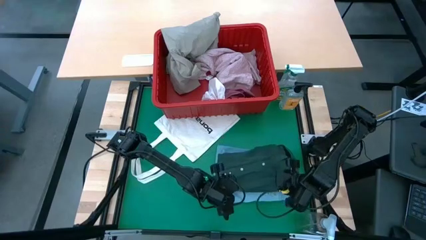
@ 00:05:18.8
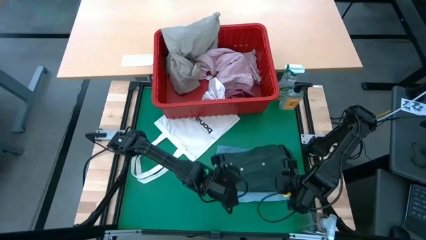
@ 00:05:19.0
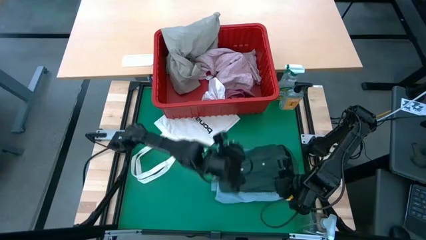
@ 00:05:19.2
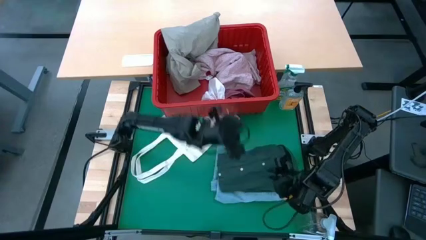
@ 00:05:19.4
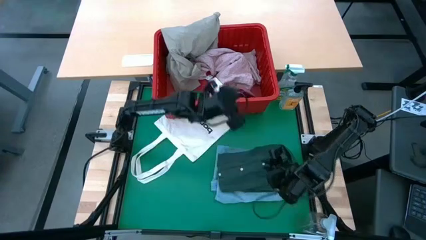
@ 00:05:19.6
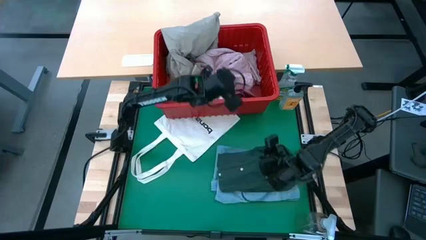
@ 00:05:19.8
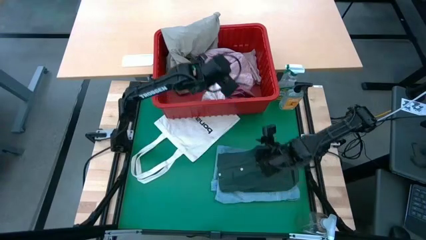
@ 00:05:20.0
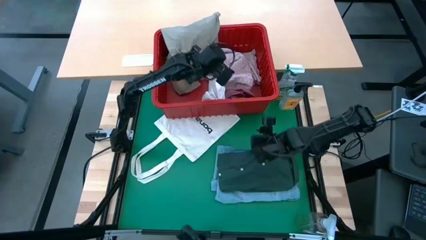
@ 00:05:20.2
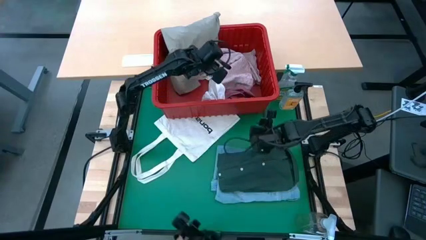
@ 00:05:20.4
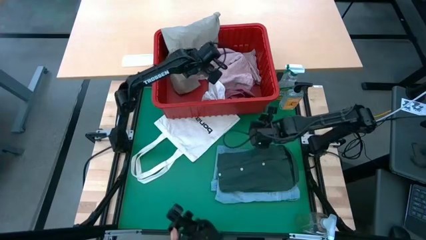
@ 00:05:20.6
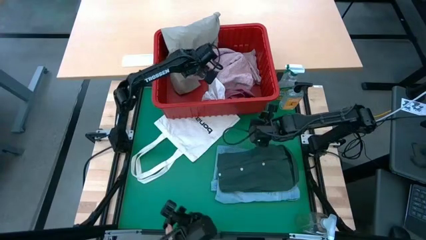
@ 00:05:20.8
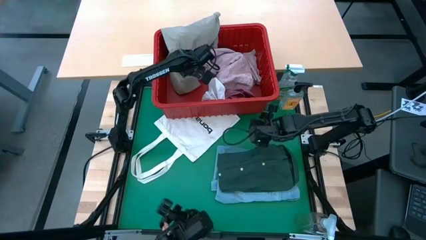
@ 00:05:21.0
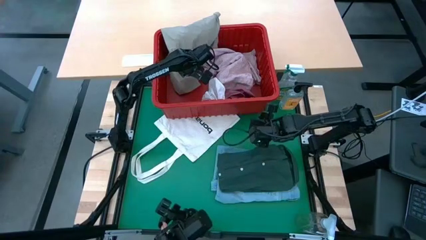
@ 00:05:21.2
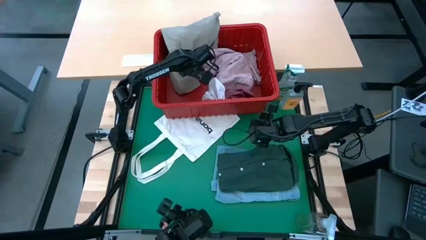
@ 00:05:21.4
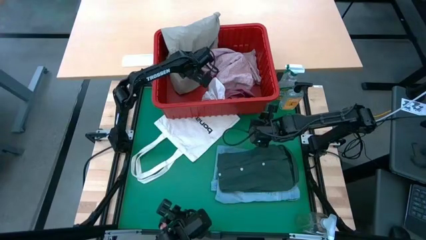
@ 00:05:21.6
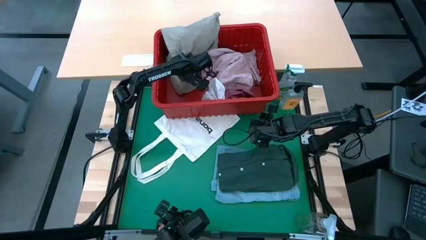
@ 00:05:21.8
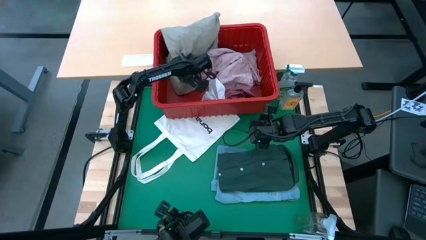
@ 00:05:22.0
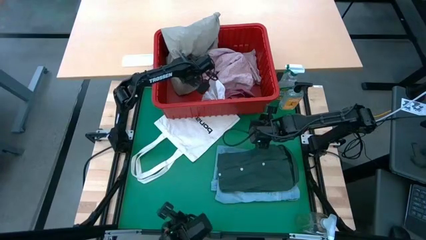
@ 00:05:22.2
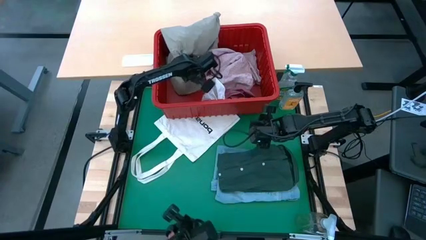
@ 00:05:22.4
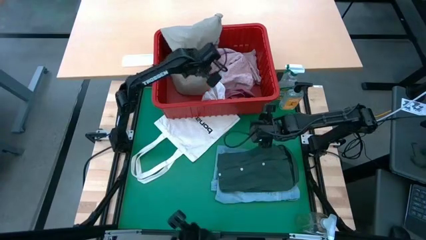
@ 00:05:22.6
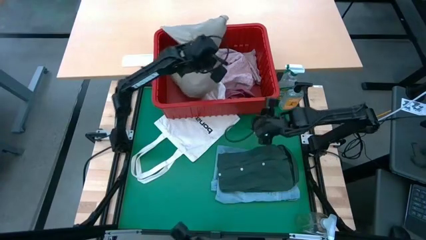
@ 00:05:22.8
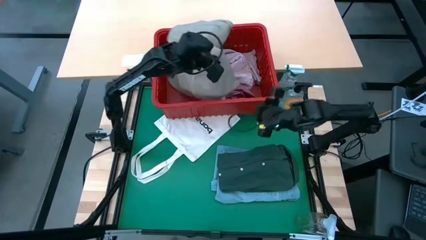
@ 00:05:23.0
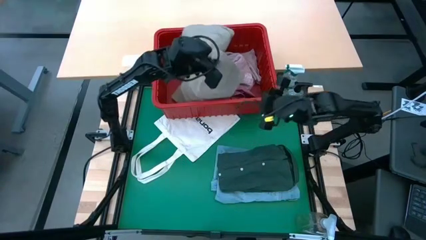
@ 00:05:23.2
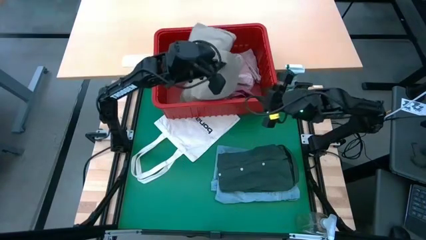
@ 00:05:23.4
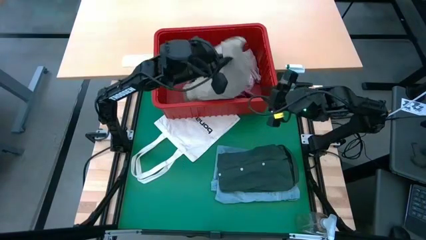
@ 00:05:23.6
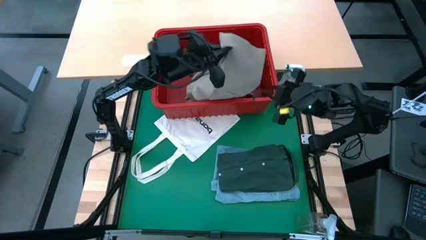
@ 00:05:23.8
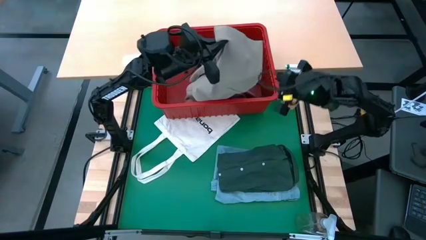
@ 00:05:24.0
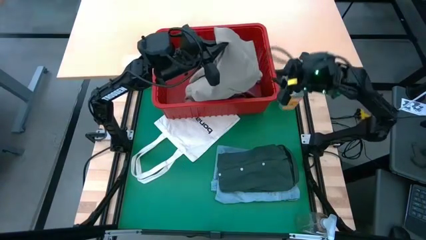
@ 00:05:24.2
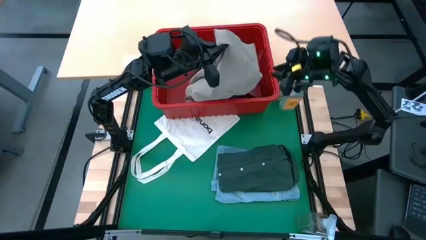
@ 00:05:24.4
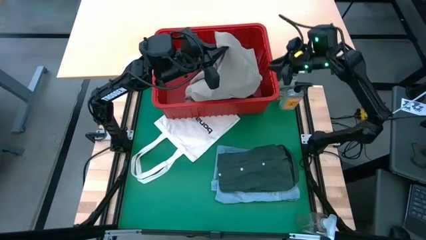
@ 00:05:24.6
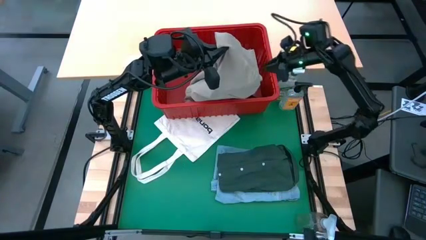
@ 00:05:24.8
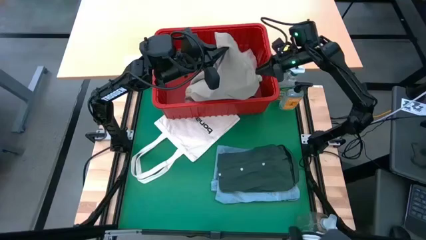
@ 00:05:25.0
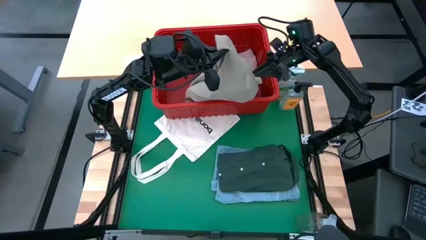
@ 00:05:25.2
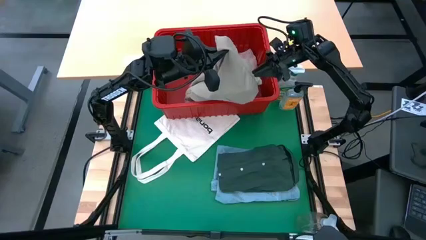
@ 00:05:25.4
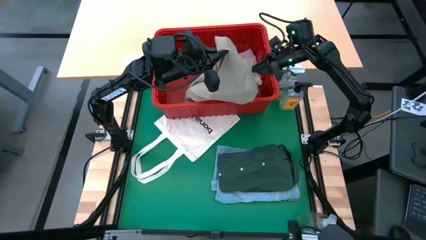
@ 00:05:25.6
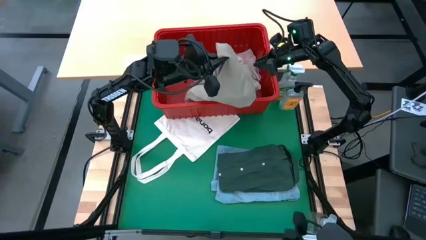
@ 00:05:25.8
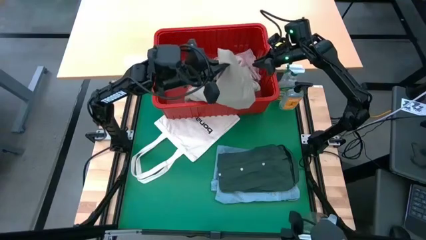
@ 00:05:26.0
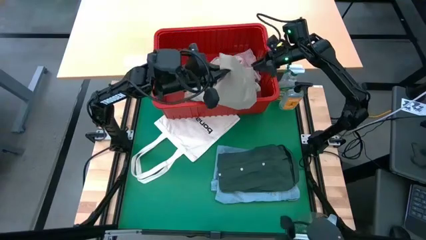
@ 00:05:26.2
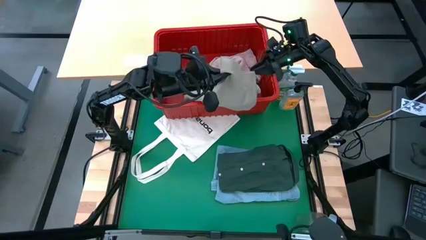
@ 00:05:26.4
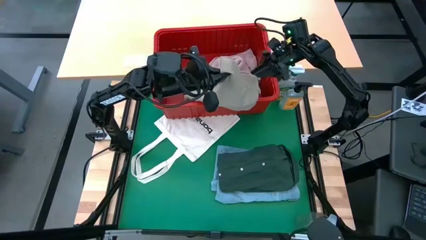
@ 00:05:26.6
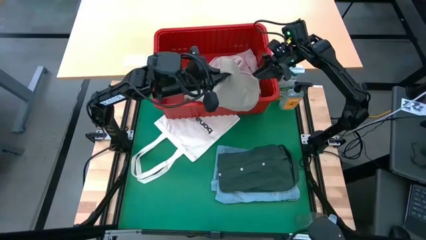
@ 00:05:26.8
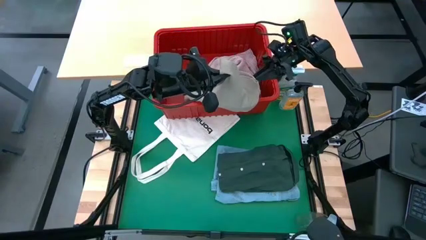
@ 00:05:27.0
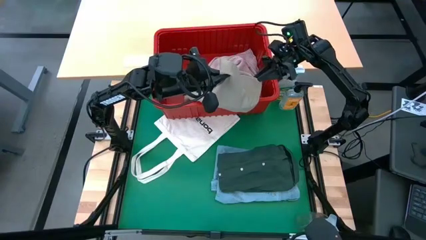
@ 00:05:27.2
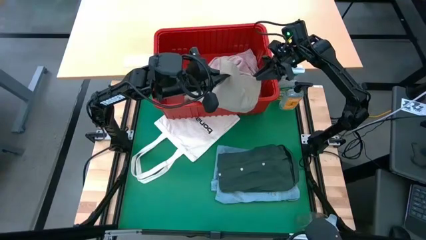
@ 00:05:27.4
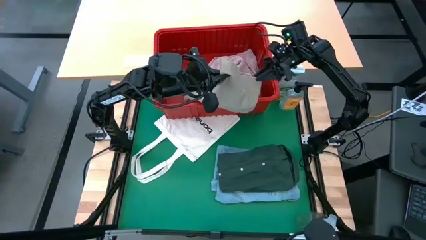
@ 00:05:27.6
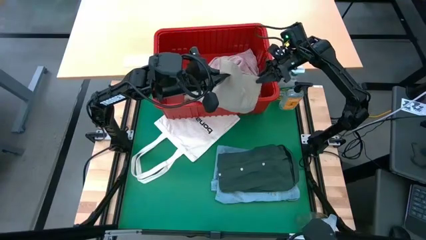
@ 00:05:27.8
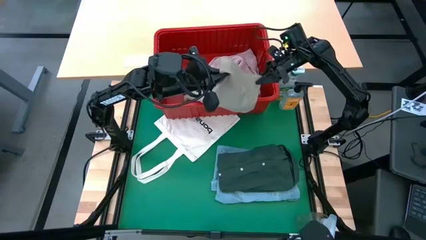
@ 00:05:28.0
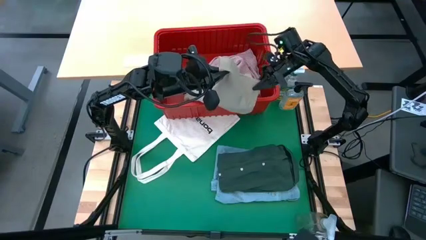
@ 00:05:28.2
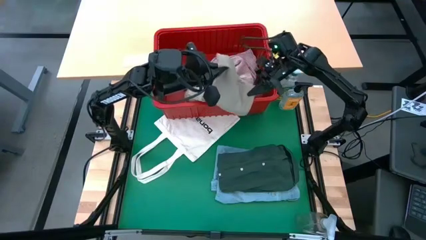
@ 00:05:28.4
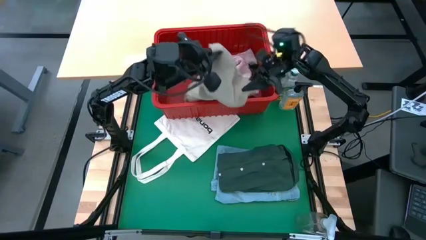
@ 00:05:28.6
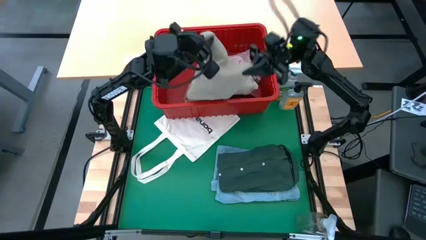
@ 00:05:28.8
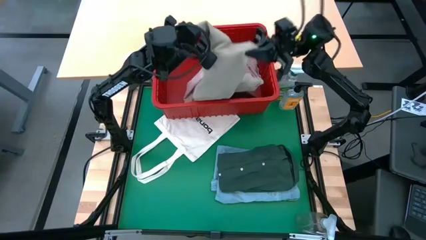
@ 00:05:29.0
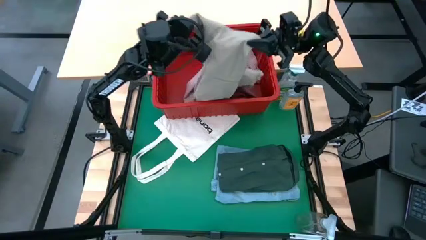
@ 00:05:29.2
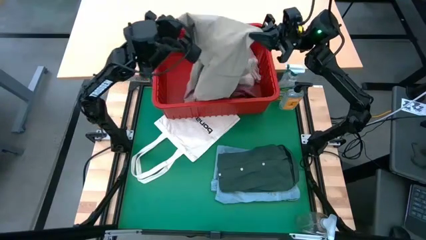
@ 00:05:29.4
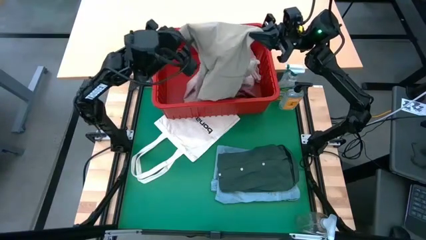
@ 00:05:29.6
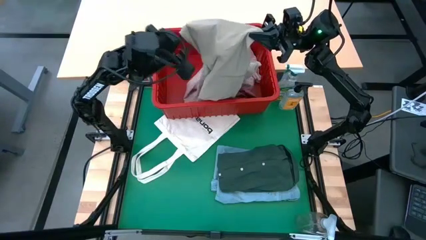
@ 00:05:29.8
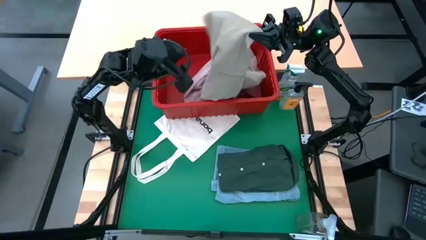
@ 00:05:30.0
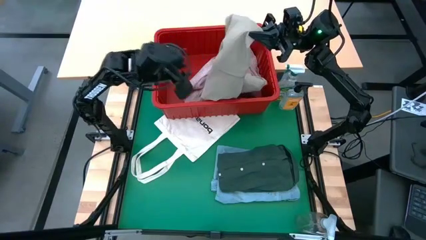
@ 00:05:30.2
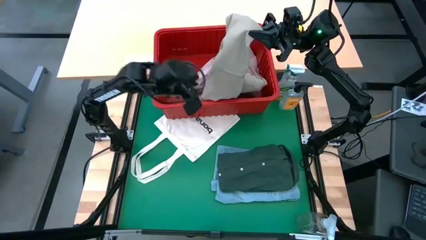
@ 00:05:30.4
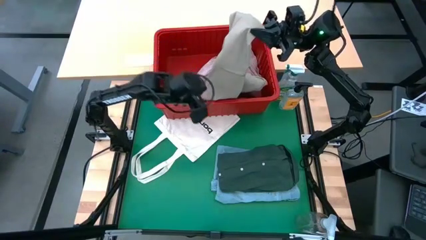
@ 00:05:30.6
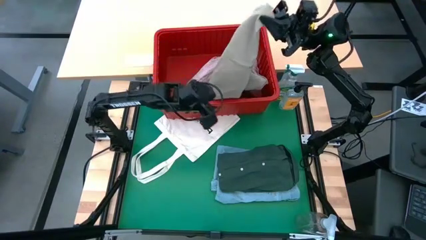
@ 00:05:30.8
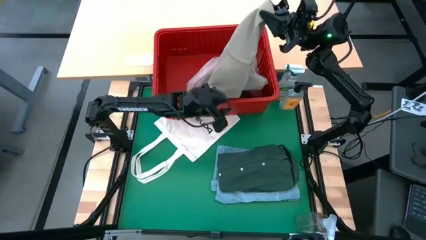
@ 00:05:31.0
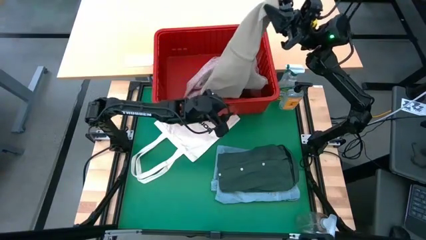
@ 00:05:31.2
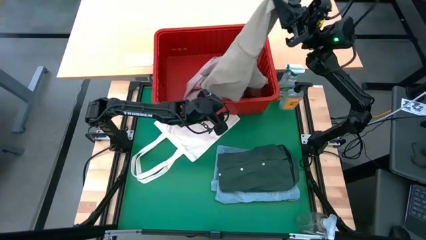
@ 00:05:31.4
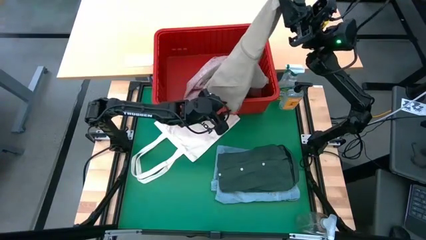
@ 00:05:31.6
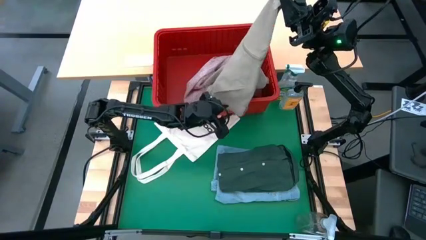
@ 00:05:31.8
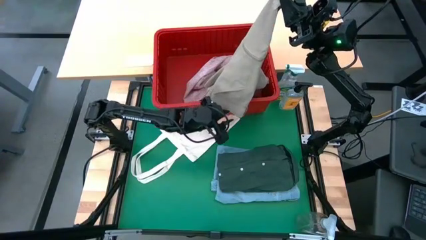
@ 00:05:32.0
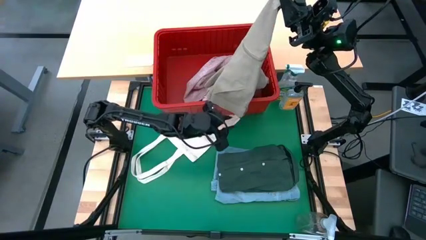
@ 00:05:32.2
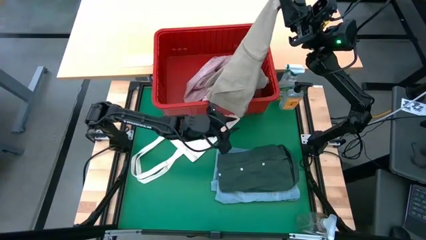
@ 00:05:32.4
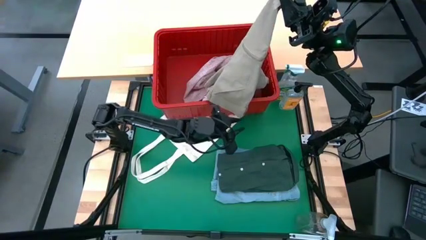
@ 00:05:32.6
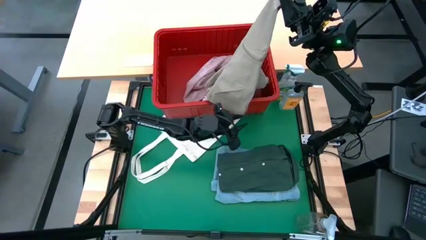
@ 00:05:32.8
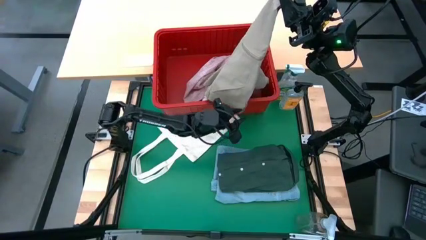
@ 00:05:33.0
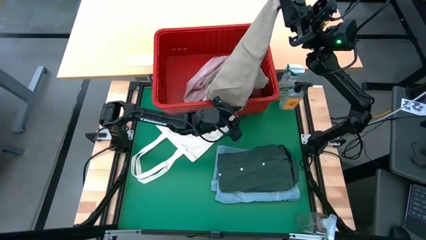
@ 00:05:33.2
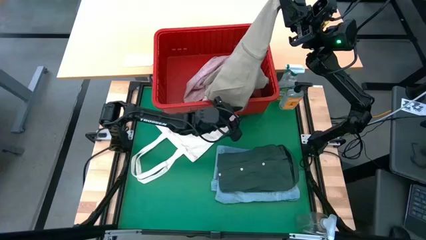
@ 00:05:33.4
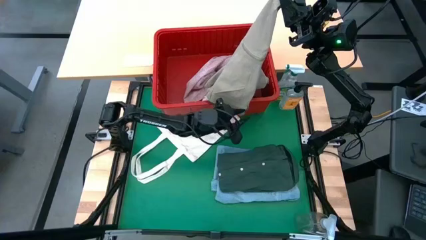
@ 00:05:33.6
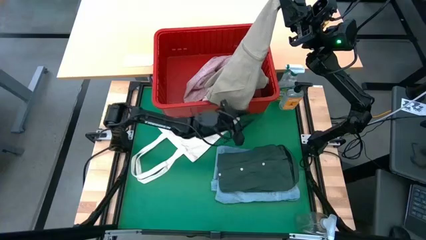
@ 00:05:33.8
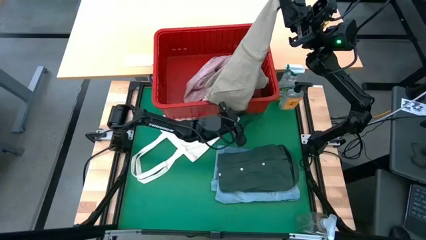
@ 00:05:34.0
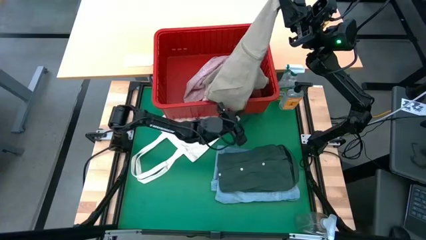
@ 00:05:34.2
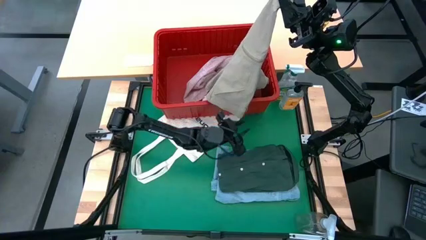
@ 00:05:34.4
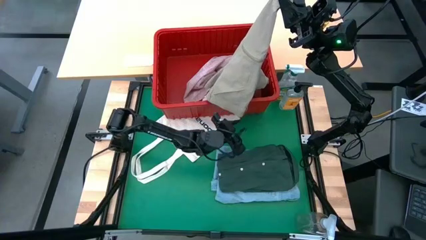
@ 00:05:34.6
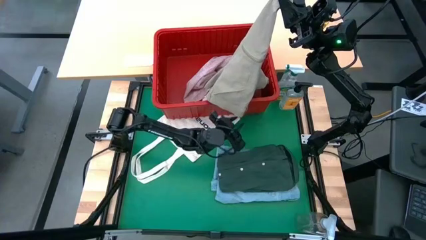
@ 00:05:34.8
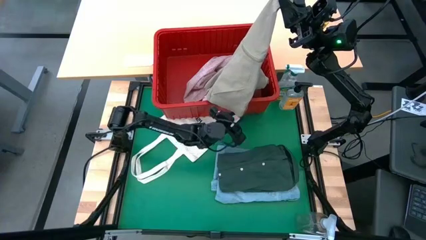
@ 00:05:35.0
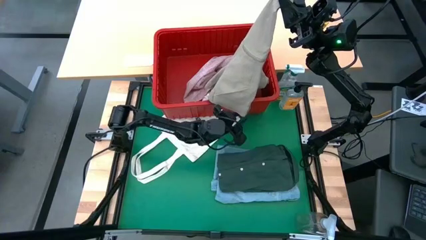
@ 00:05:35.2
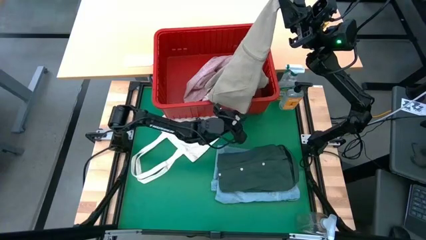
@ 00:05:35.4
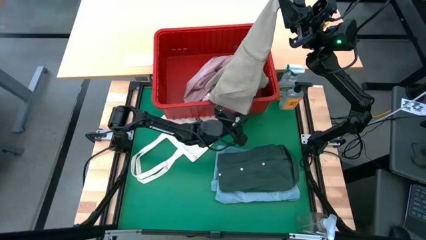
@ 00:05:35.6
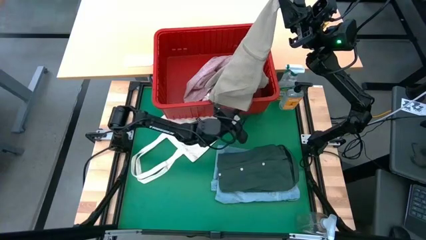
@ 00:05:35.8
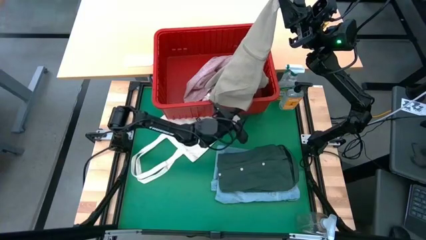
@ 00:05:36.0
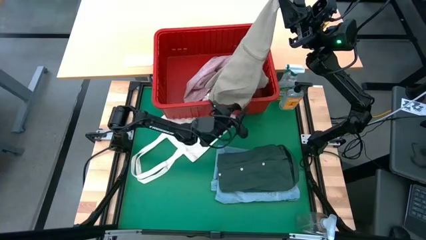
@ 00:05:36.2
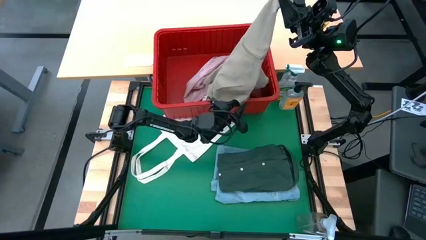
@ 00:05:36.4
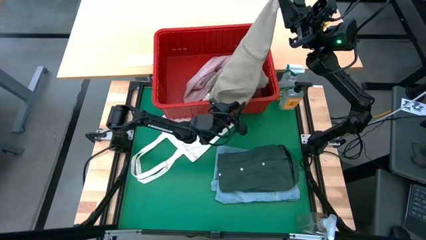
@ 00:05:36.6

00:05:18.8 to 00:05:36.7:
Task: Fold laundry
Fold the gray shorts
